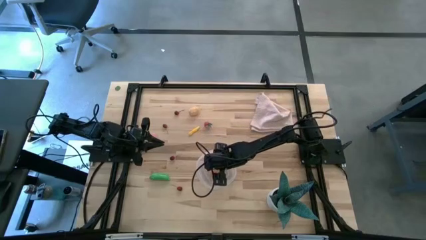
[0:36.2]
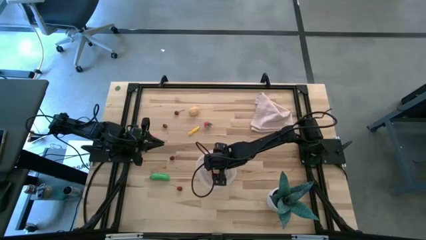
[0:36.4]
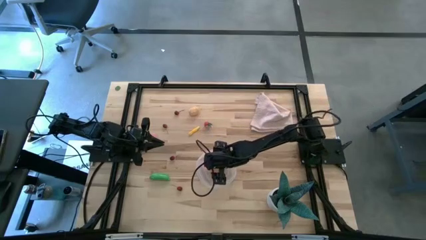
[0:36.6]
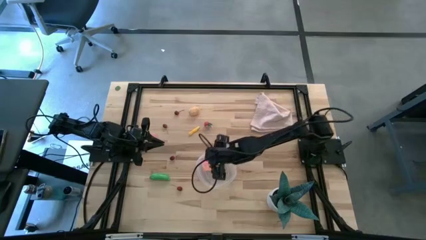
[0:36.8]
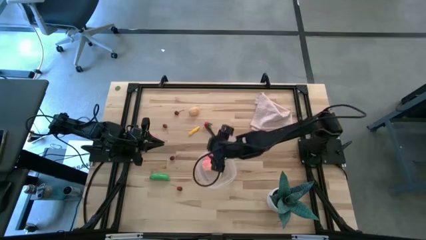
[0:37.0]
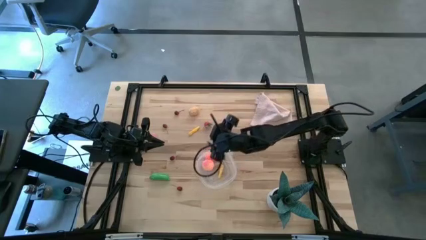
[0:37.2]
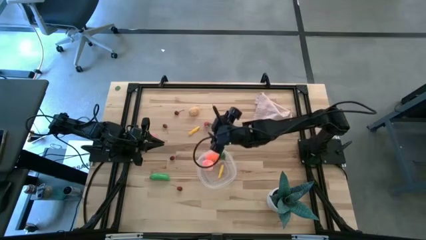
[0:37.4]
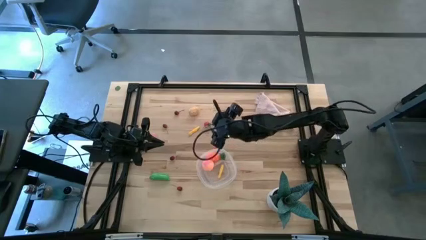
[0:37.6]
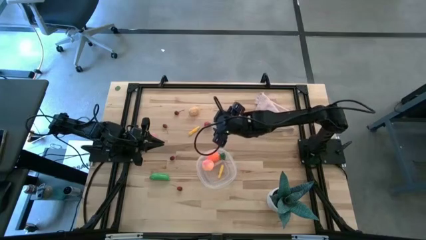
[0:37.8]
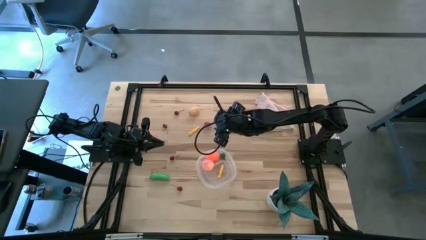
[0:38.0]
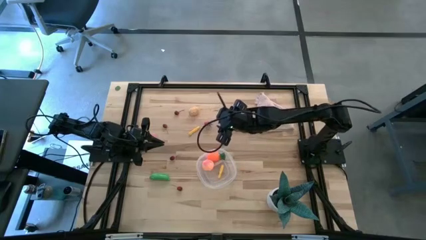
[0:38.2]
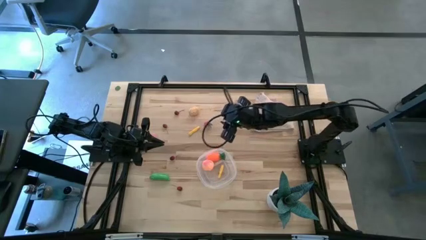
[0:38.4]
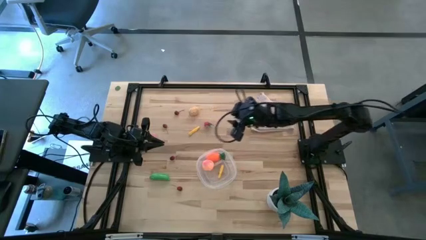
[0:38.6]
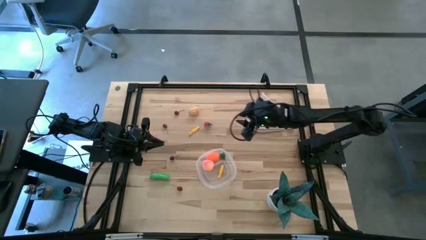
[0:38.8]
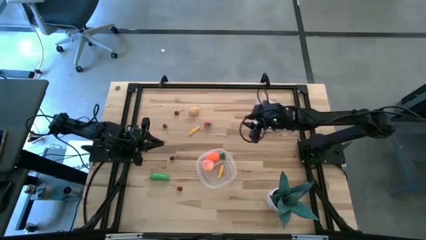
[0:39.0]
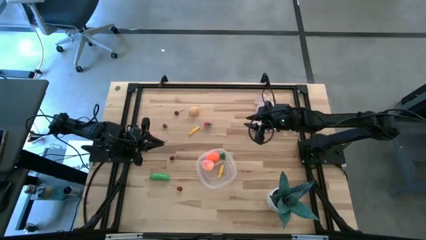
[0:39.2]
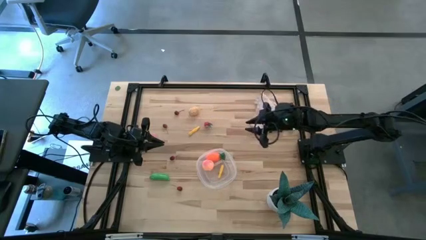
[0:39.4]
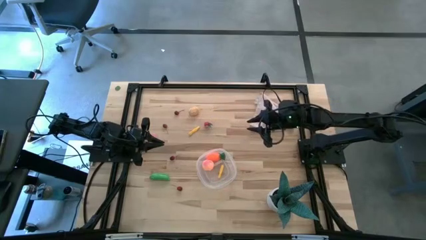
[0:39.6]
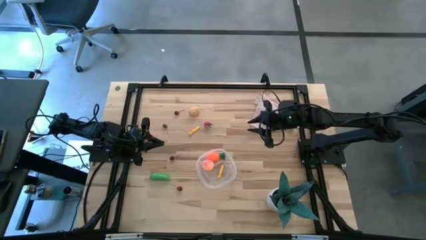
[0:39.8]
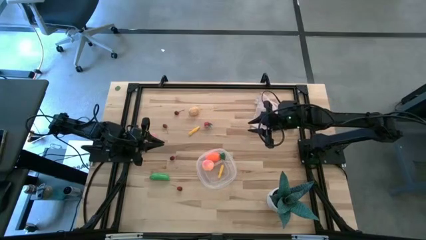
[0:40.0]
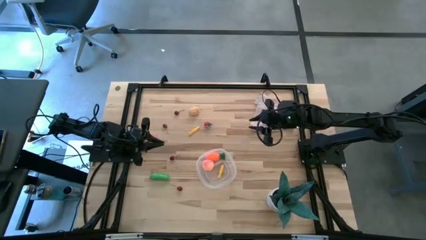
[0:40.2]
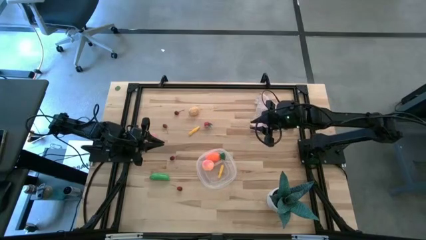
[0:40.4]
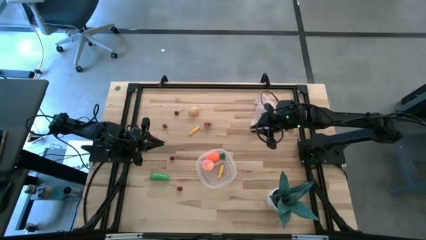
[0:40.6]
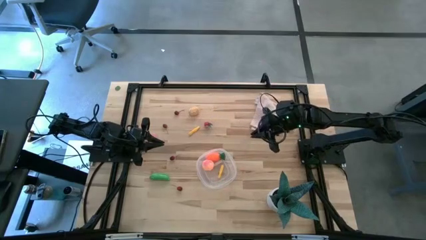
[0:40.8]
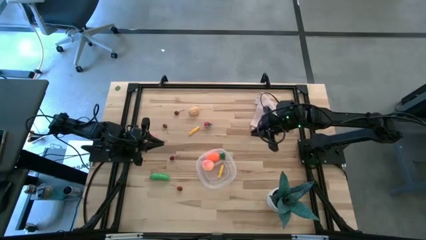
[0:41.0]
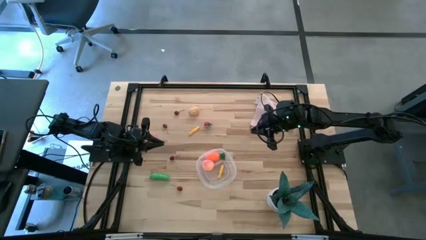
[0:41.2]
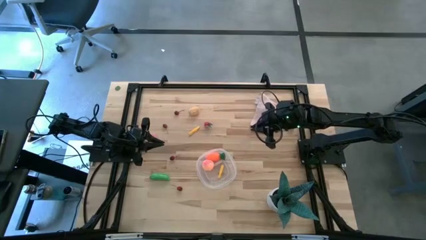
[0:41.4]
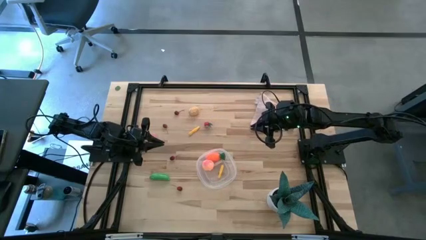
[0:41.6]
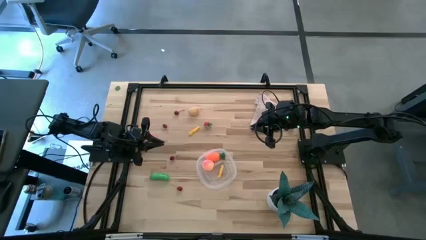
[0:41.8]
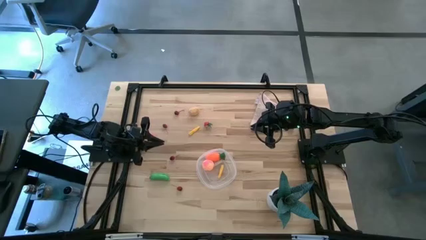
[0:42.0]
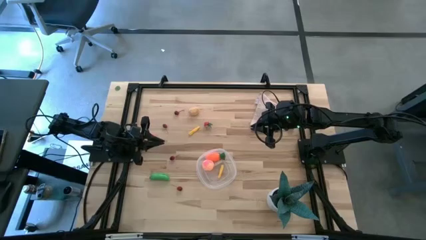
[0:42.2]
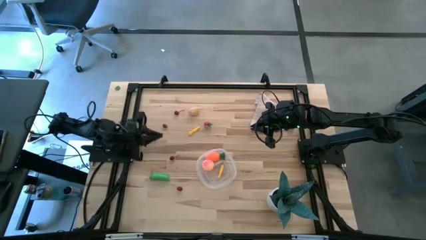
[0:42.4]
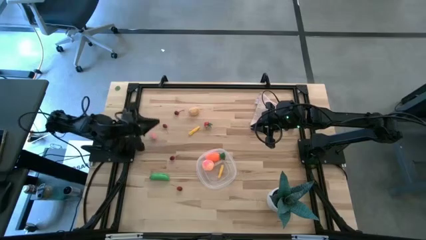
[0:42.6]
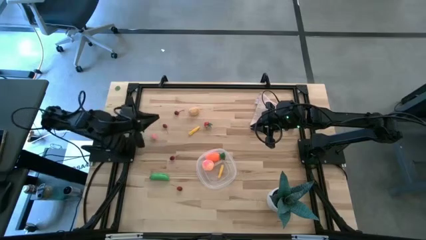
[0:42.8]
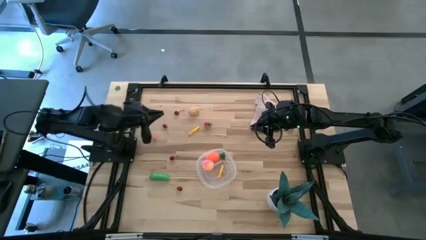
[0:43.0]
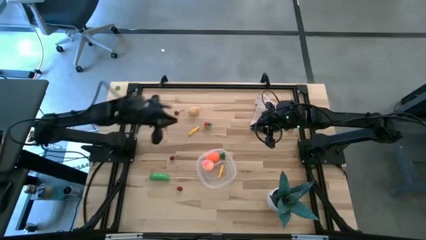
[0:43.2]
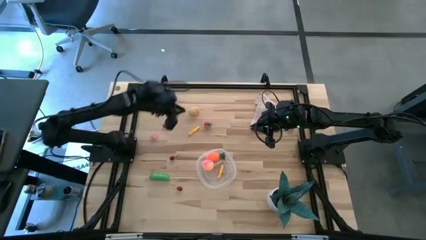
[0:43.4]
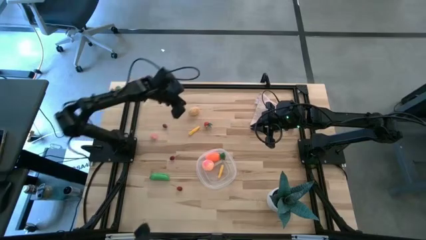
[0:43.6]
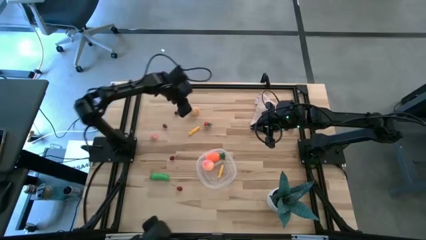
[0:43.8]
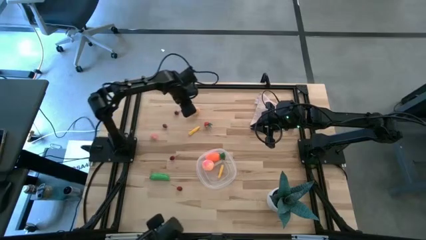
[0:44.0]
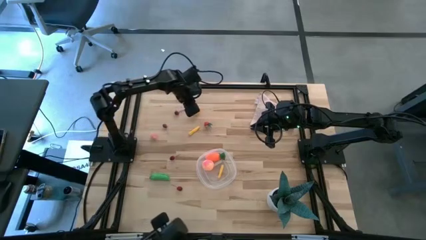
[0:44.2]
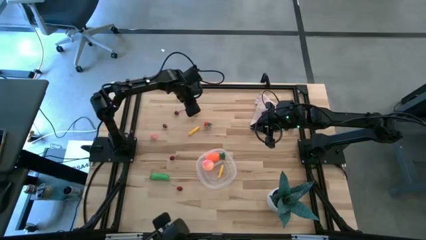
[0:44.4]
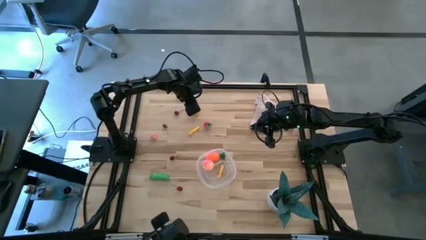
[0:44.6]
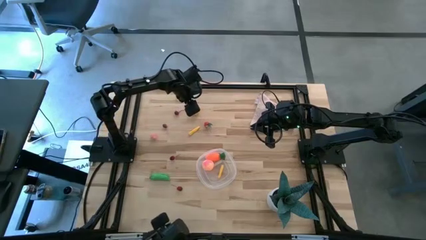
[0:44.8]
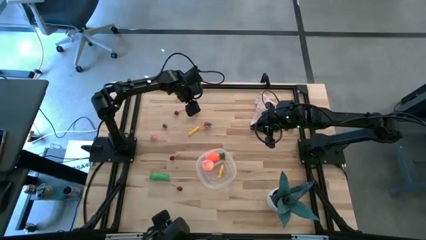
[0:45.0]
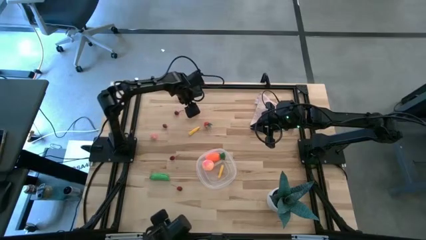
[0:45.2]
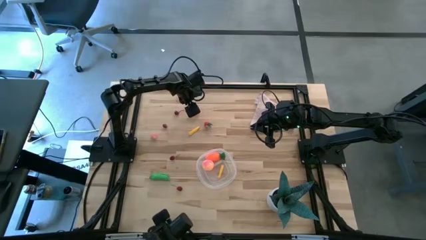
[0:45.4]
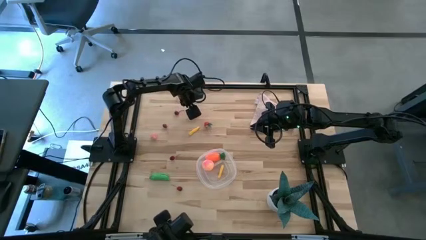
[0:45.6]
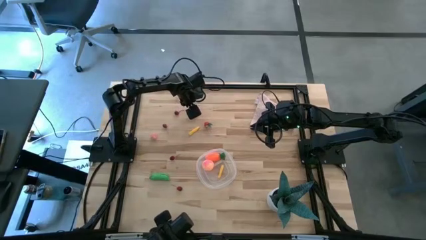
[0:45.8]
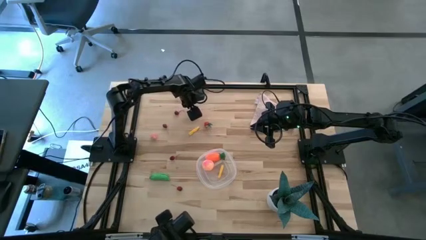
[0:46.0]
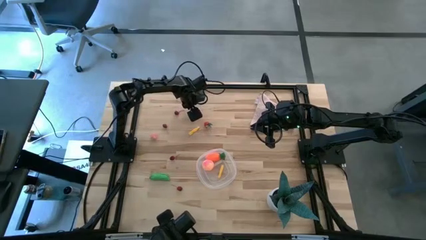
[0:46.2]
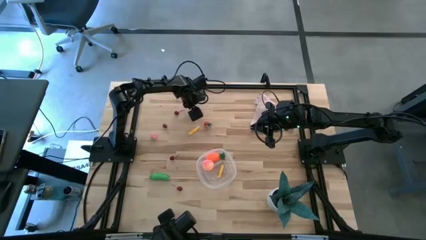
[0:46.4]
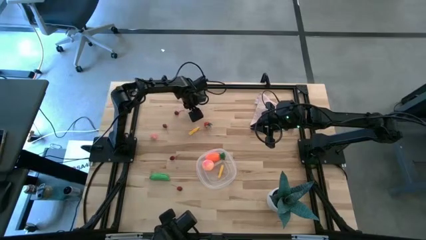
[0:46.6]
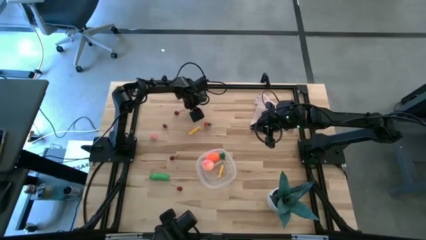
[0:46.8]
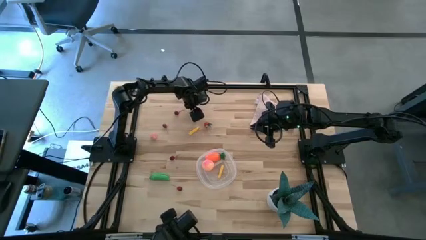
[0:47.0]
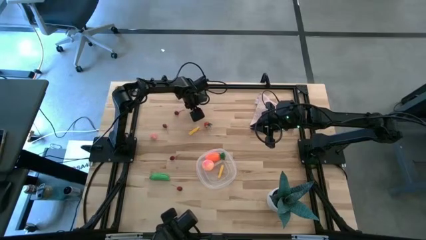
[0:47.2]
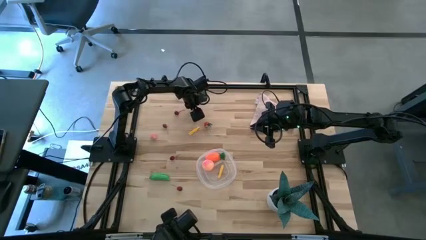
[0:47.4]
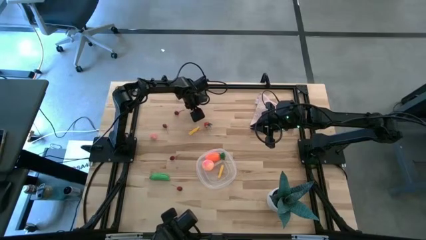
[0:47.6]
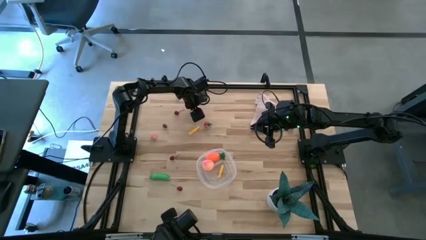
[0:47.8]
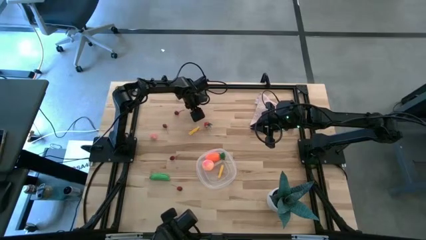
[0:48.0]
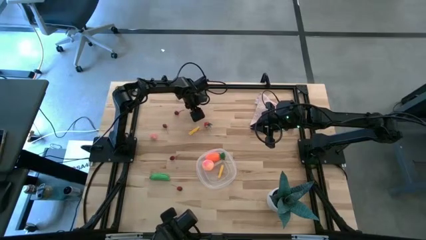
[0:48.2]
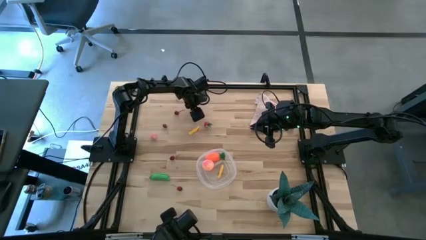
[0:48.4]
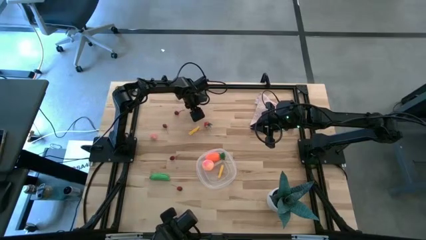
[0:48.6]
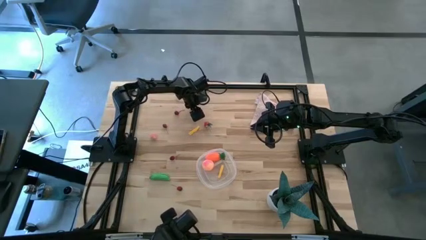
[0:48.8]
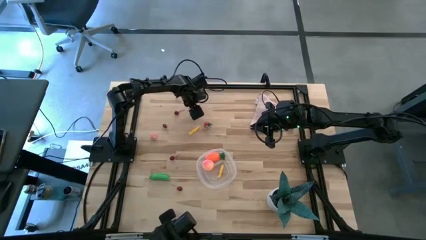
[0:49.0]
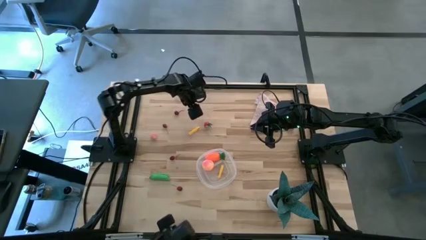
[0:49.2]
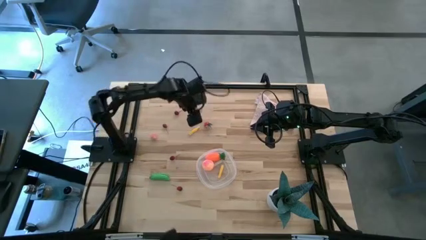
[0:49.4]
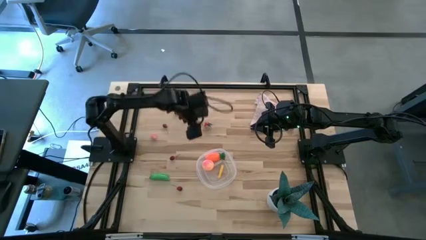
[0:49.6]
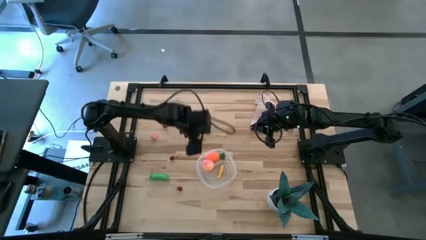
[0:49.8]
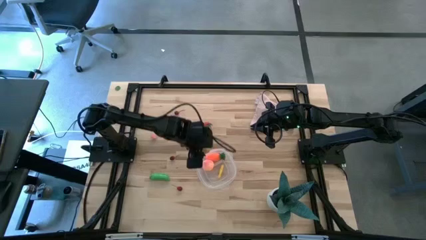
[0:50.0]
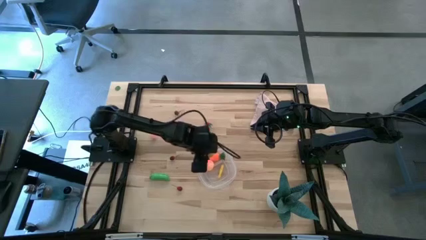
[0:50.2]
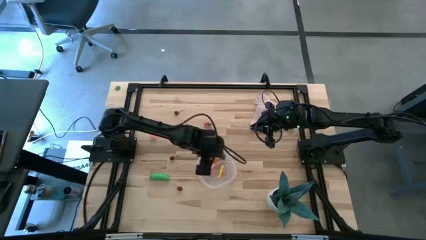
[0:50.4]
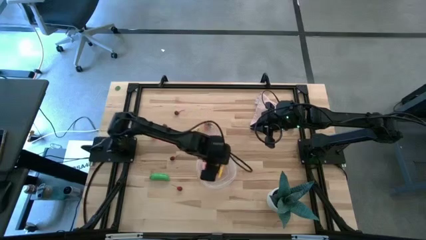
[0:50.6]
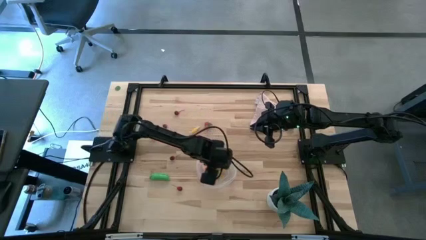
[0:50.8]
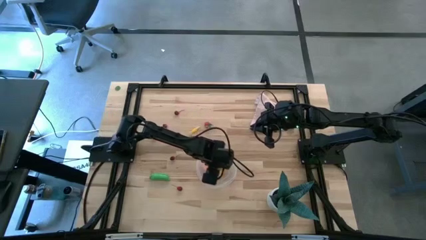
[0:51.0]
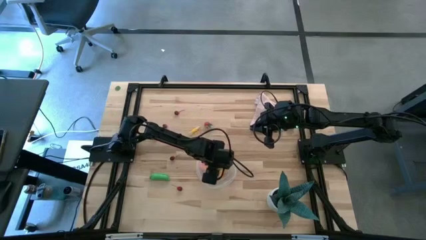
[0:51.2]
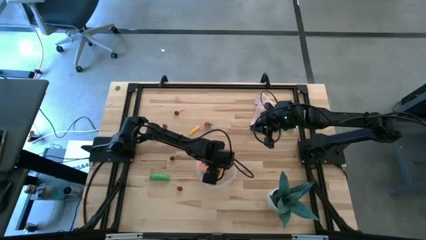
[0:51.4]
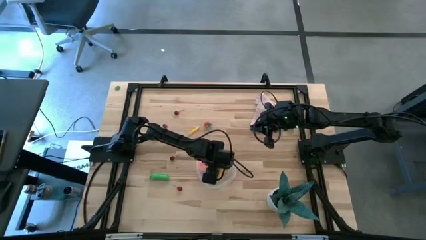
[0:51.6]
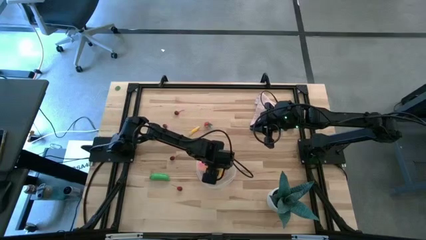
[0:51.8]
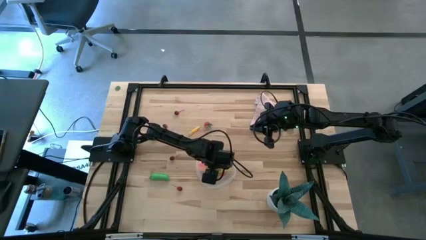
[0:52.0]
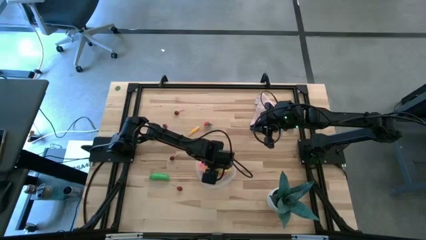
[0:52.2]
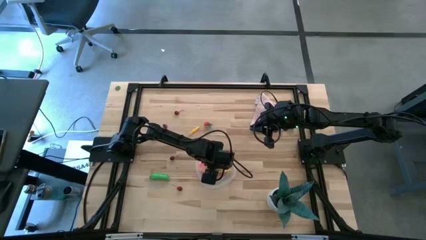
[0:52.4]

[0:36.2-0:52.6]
Task: Pick and placing Produce into tupperware
Put the potato into the transparent bin
